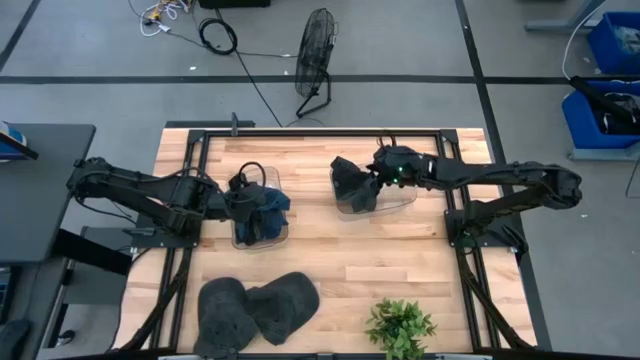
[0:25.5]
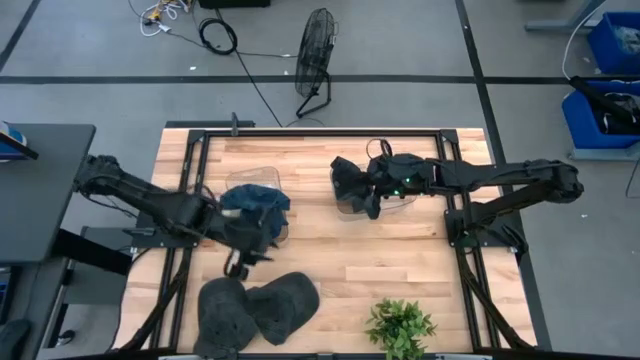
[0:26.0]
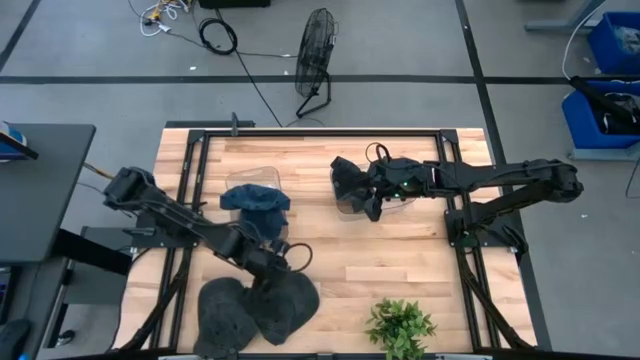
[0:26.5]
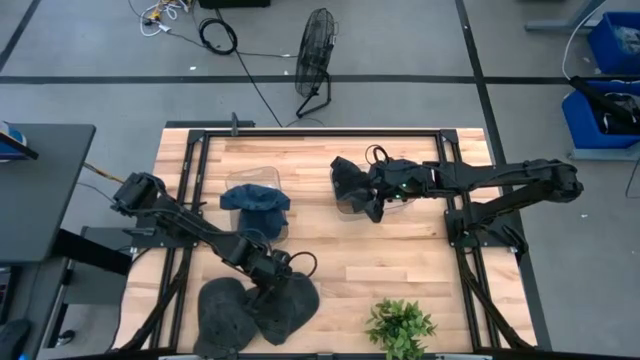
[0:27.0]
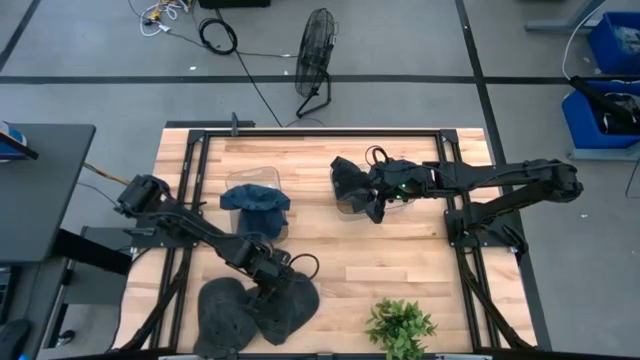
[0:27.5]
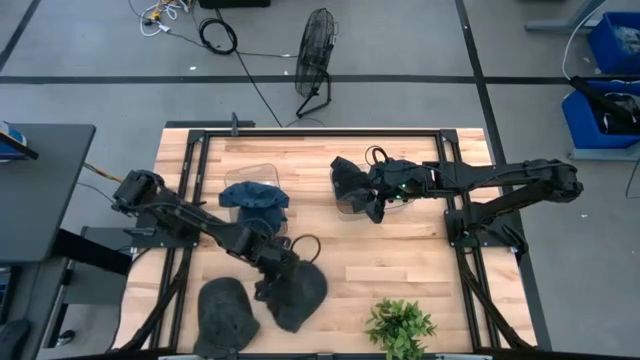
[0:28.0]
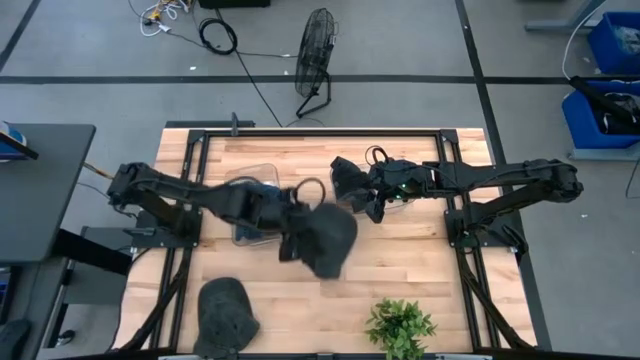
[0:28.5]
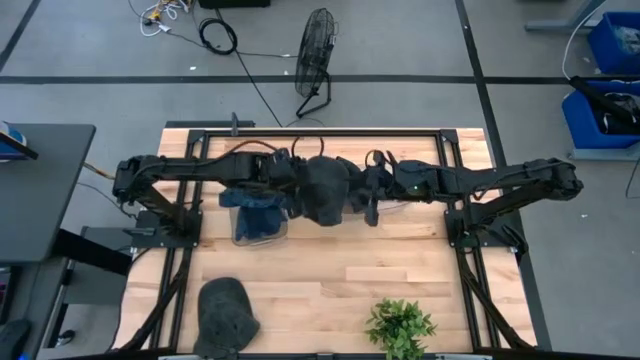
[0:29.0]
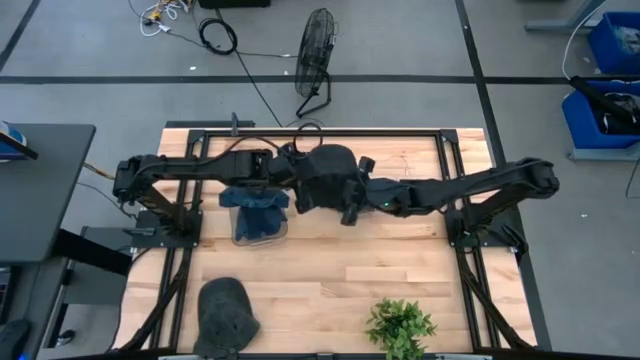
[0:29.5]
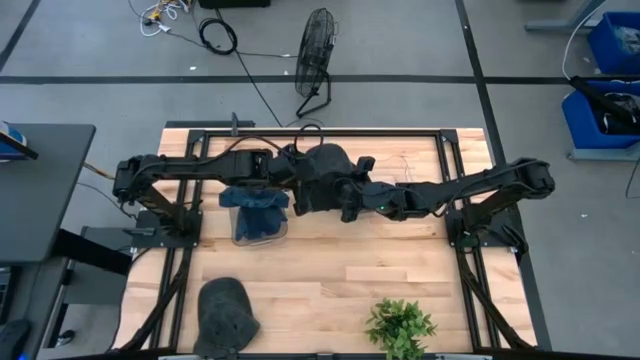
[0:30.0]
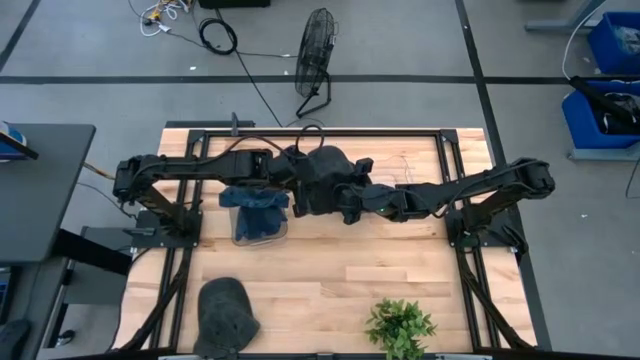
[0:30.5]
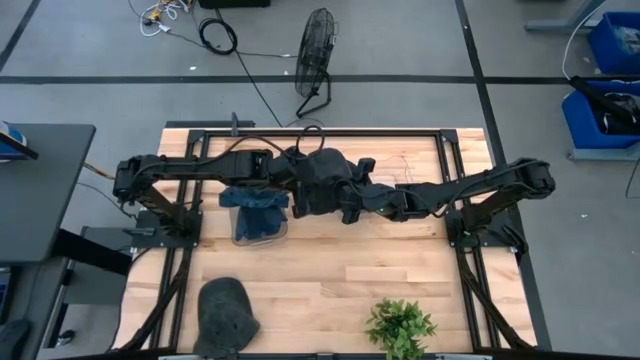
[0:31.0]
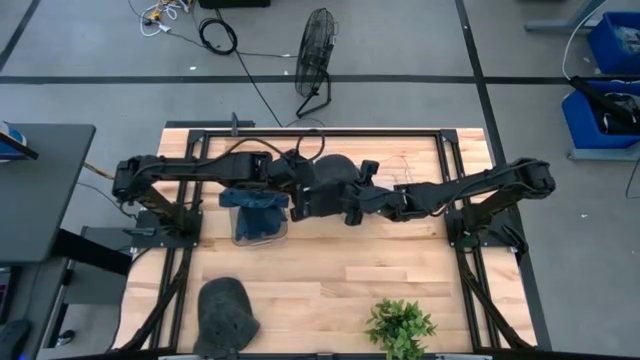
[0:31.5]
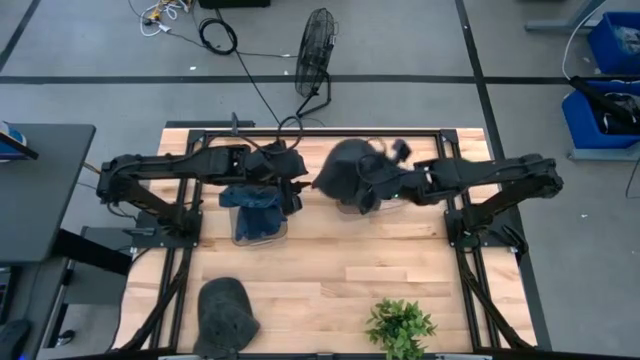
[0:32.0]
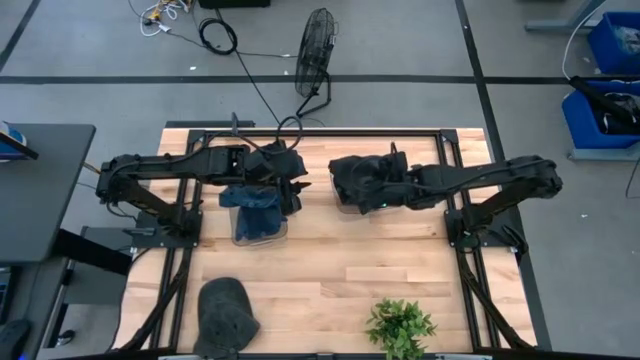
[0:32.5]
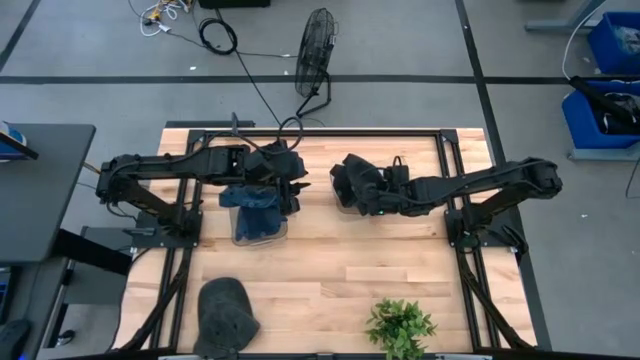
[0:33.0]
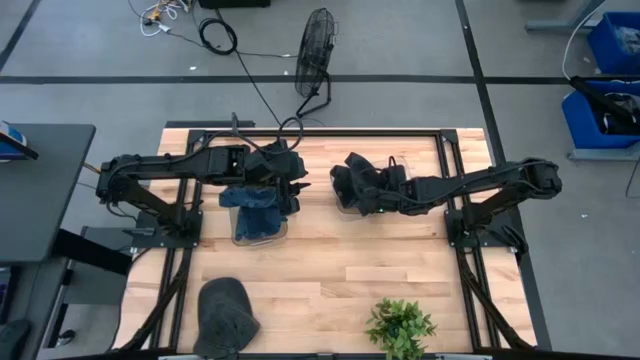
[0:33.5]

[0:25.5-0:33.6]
Task: Pick & Place hat
Put the right black cap into the right transparent bin

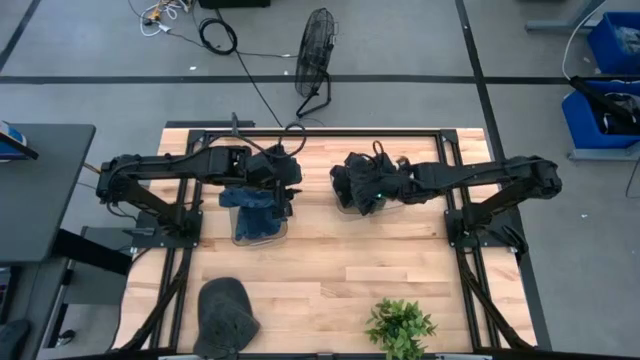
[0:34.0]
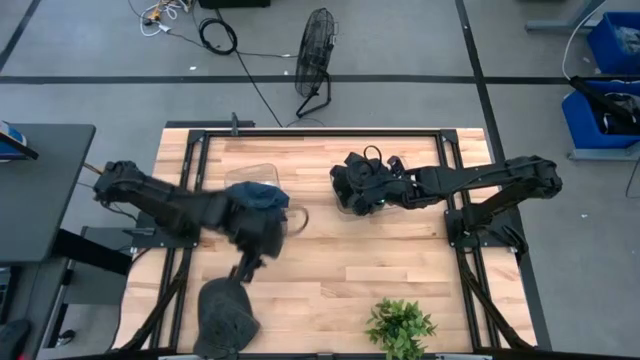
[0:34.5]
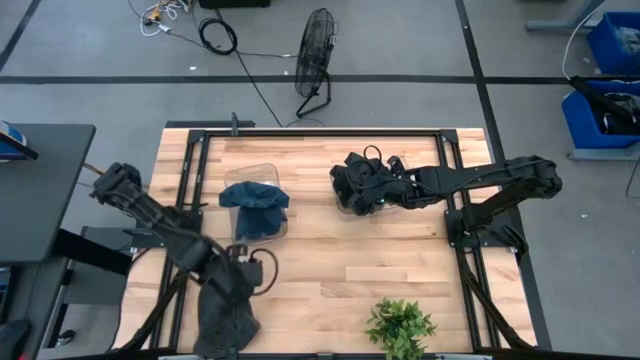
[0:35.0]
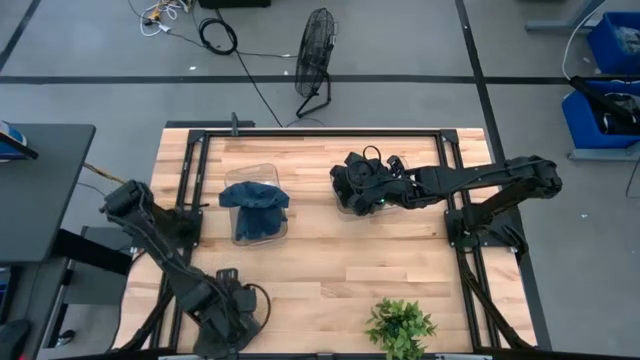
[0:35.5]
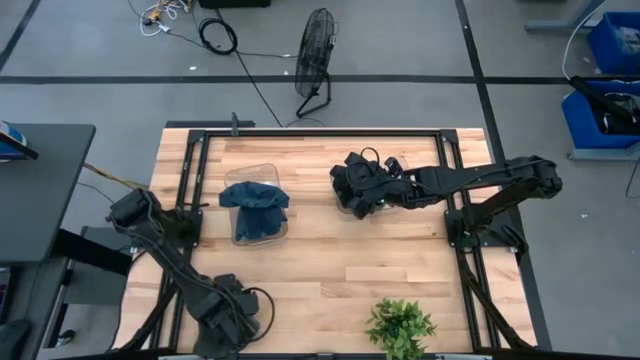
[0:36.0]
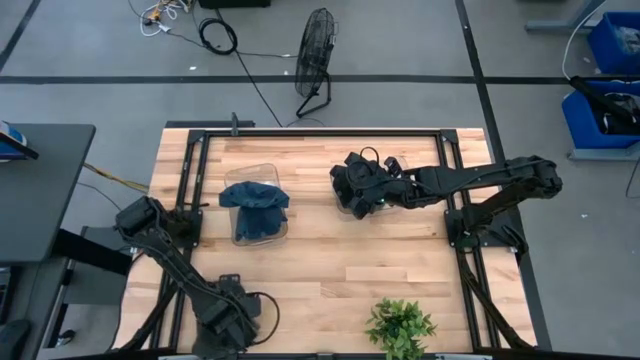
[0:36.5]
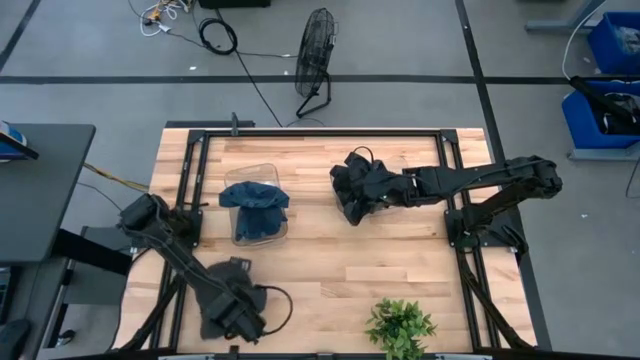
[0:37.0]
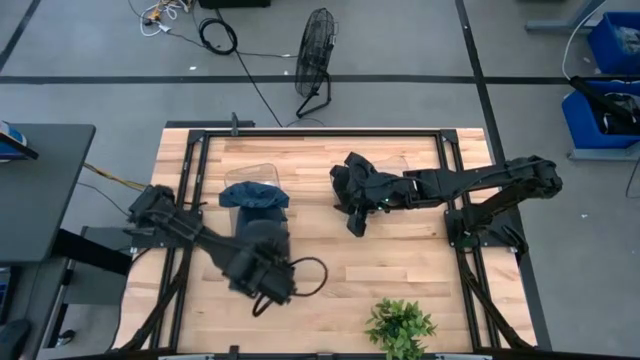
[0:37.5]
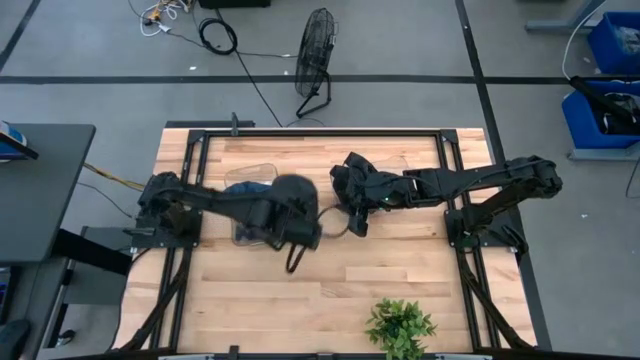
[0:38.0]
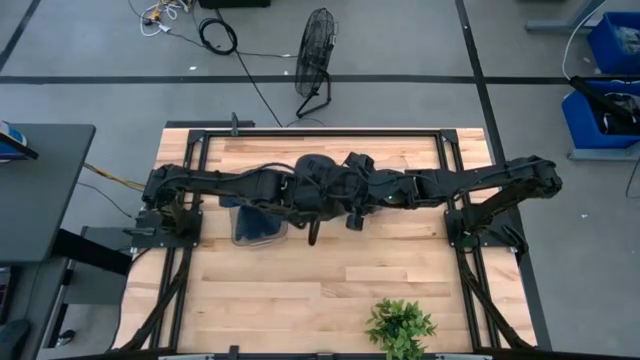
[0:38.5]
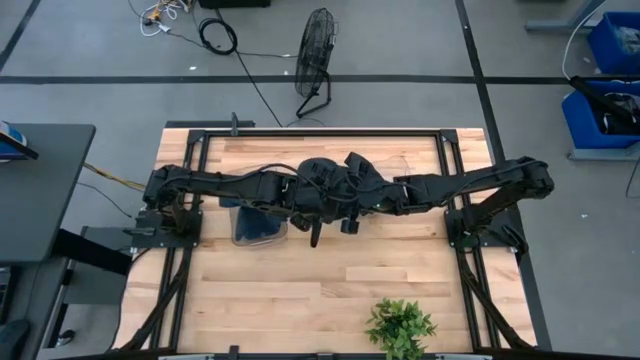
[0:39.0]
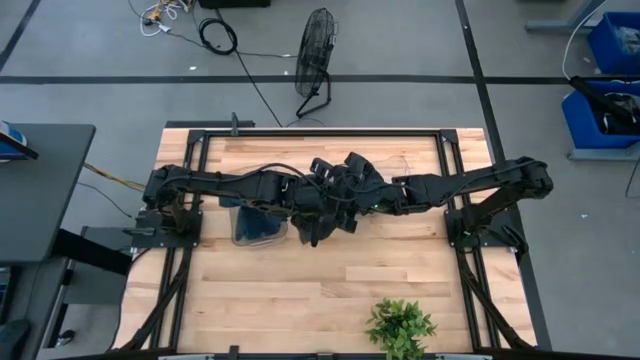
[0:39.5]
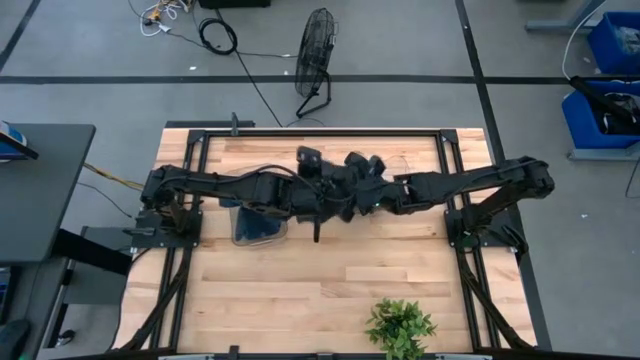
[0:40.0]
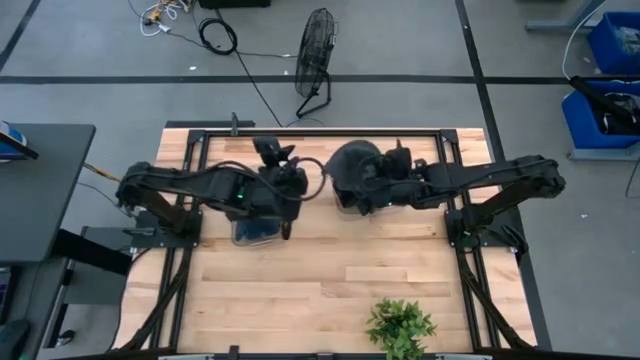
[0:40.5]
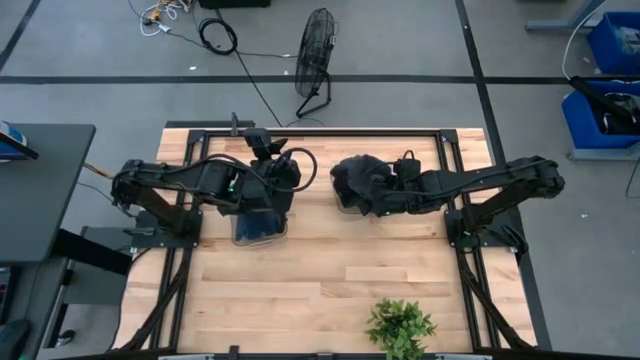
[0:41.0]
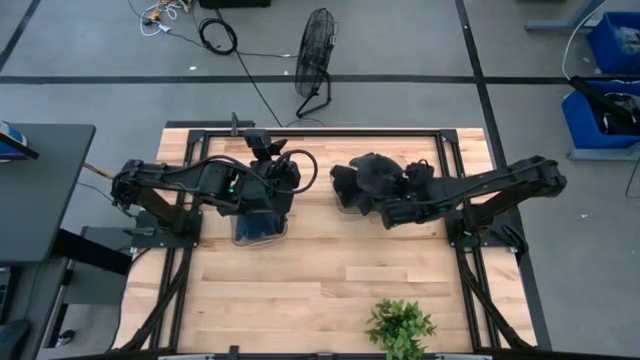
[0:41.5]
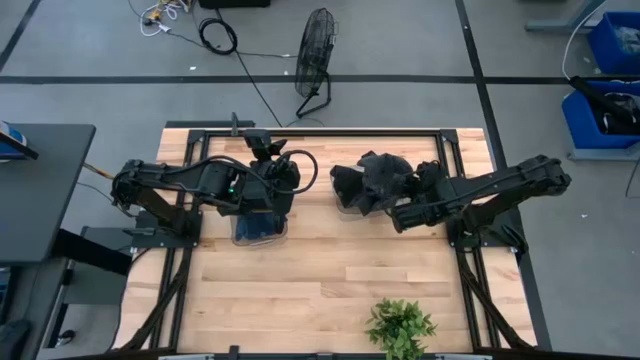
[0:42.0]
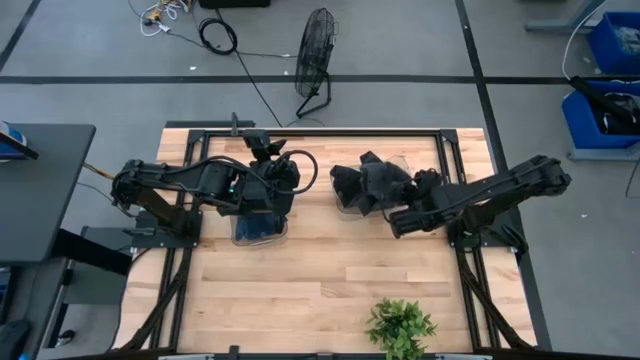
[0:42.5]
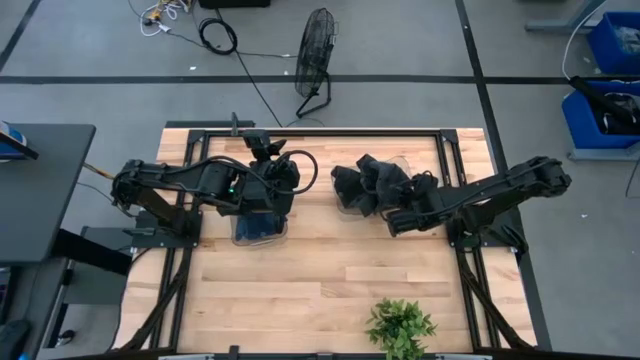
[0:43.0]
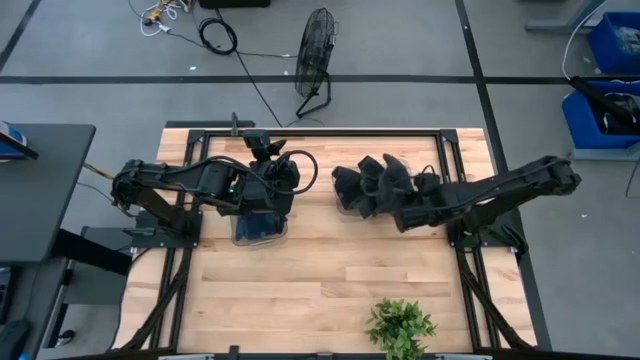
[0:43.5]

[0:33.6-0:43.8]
Put the black cap into the right transparent bin

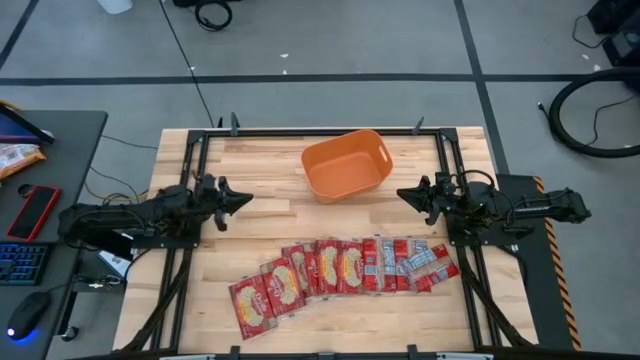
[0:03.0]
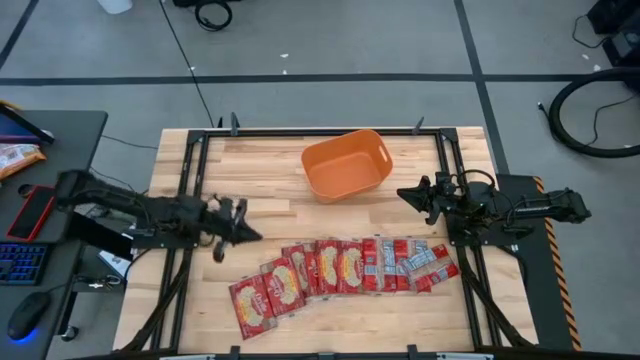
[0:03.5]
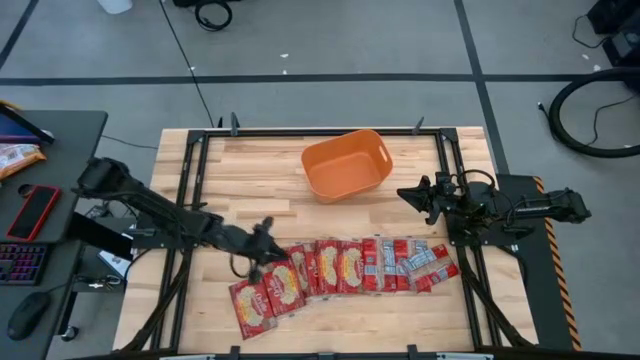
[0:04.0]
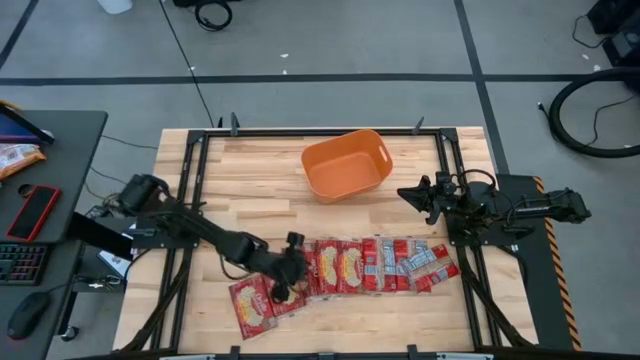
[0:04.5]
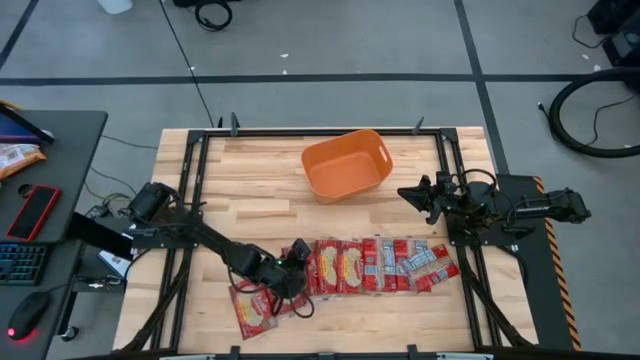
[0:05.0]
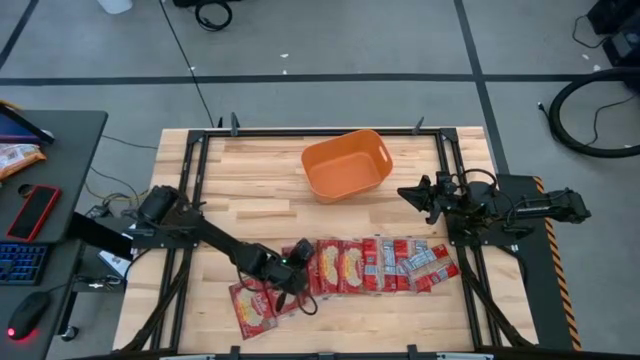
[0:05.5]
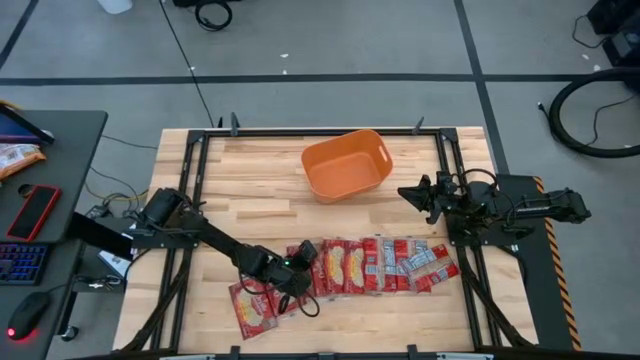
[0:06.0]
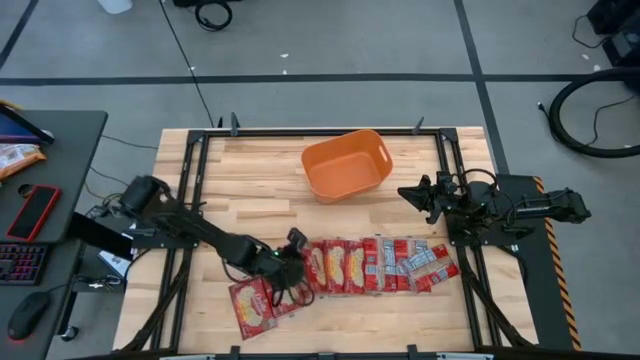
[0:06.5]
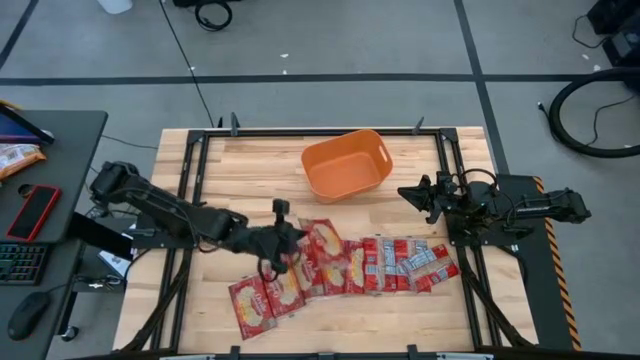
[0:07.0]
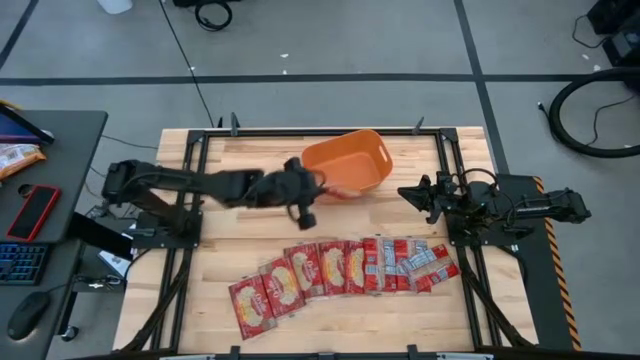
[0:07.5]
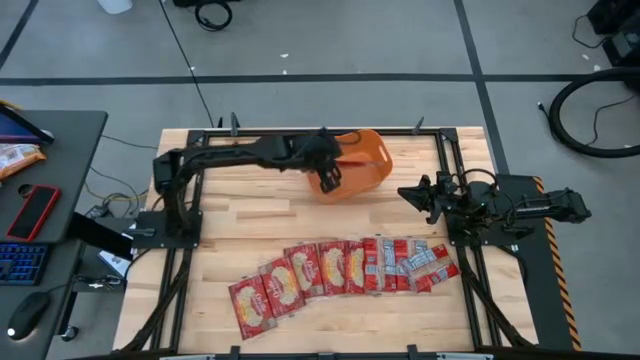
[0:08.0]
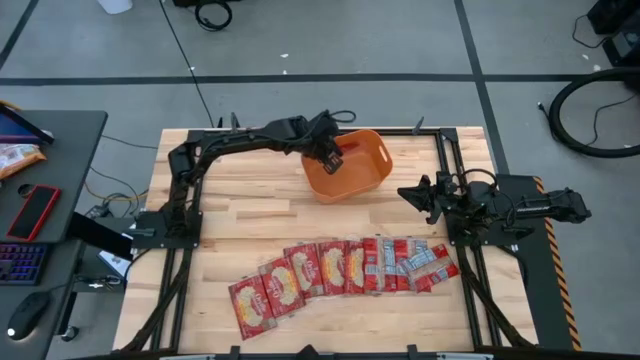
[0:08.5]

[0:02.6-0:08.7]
Task: Sort popcorn bags into baskets
Put the red popcorn bag into the orange bin
